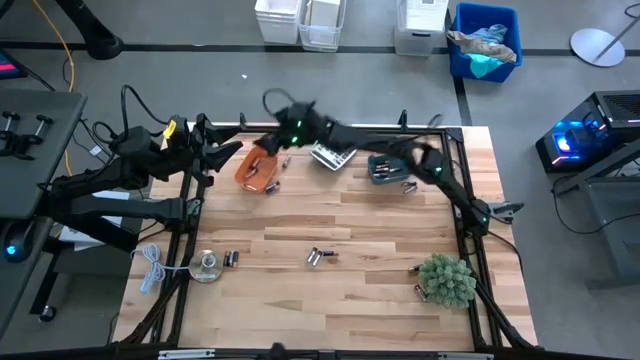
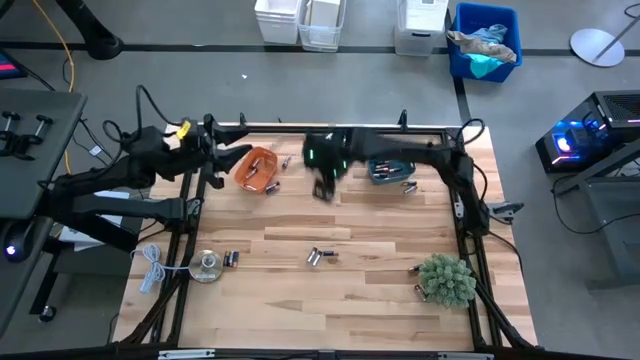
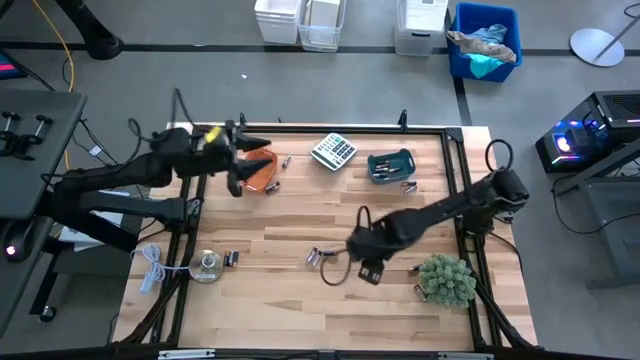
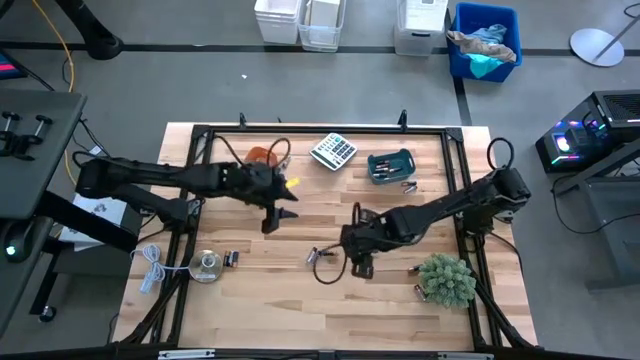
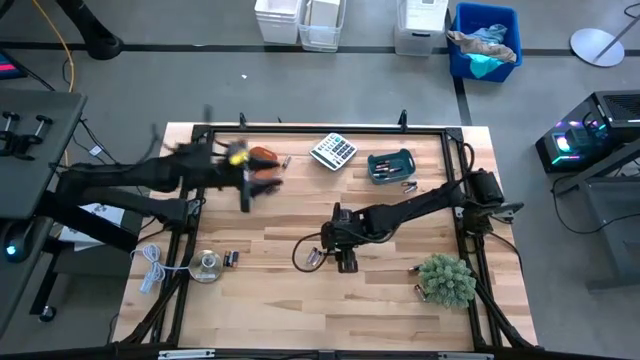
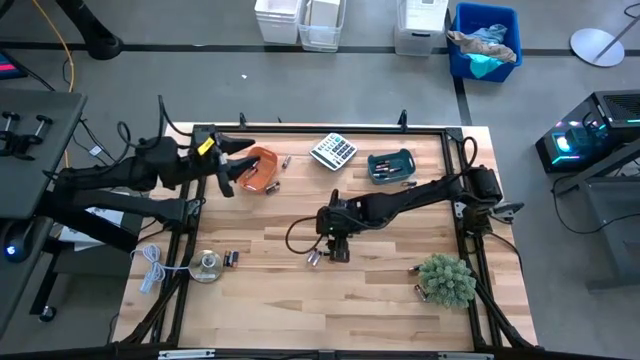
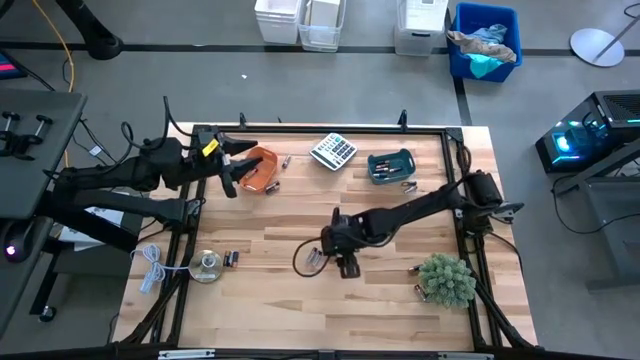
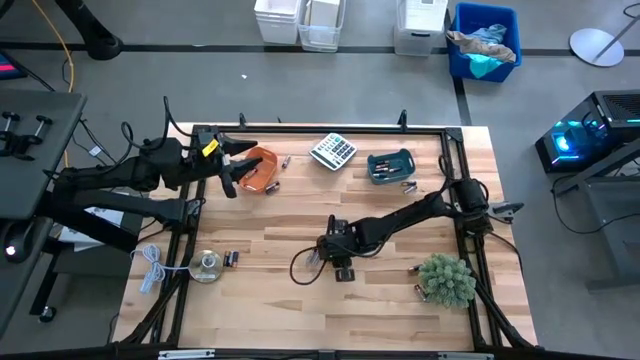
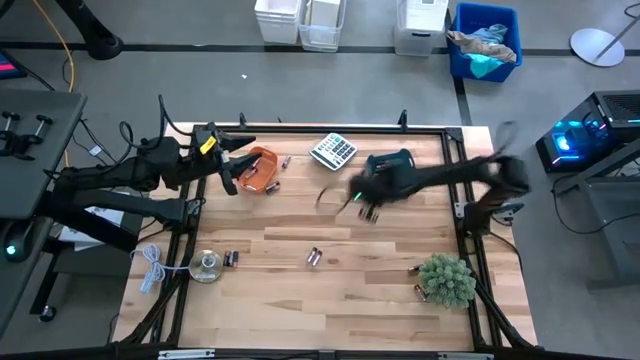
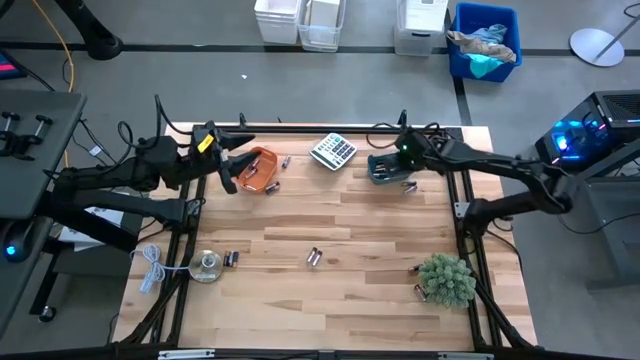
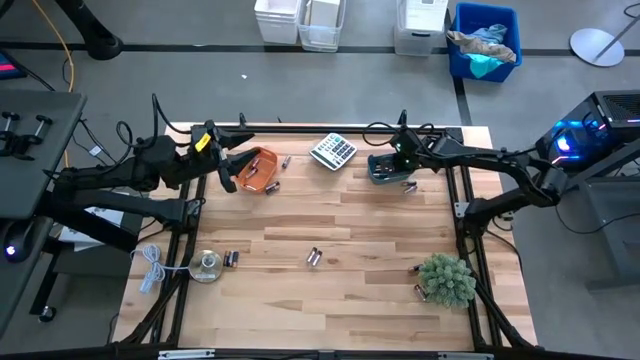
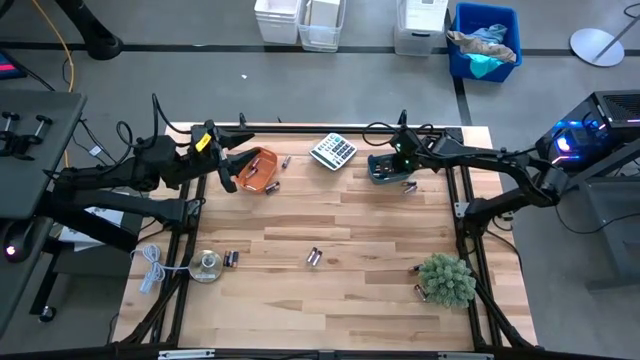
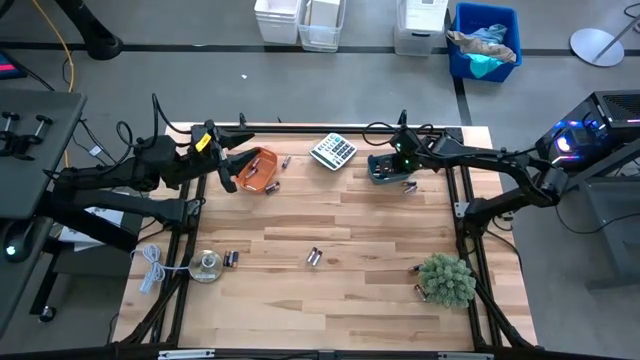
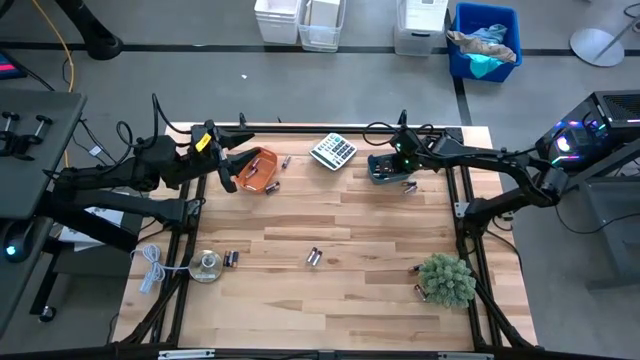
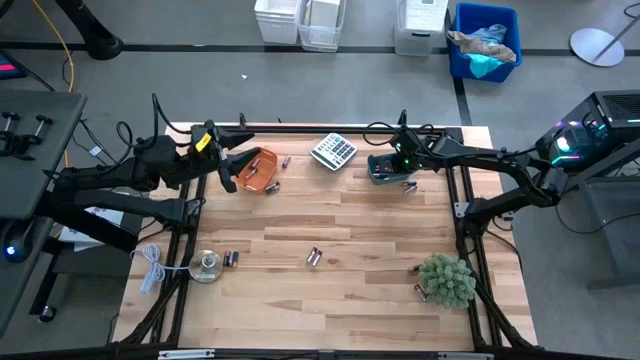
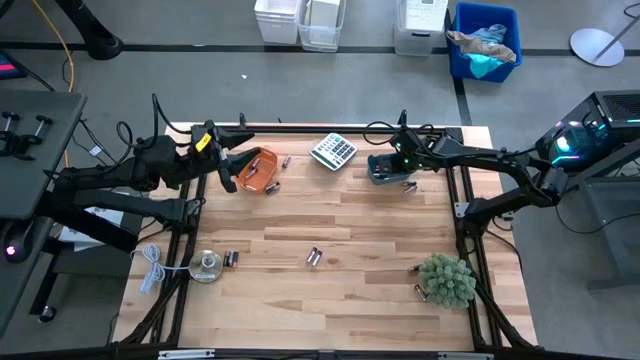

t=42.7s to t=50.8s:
Task: Sort batteries
Put the golden battery into the blue bin

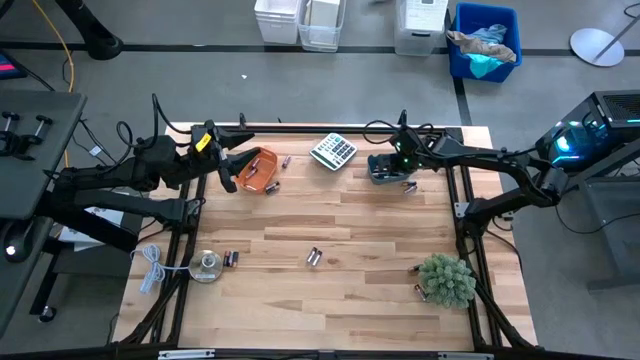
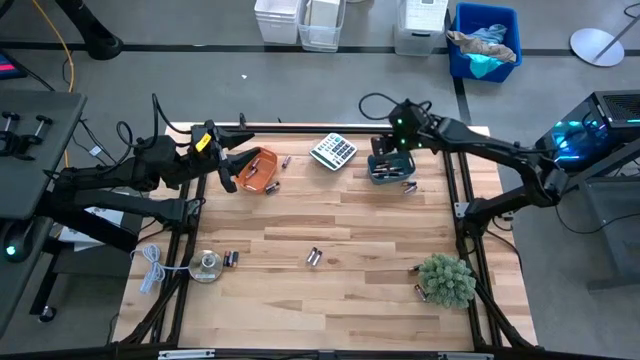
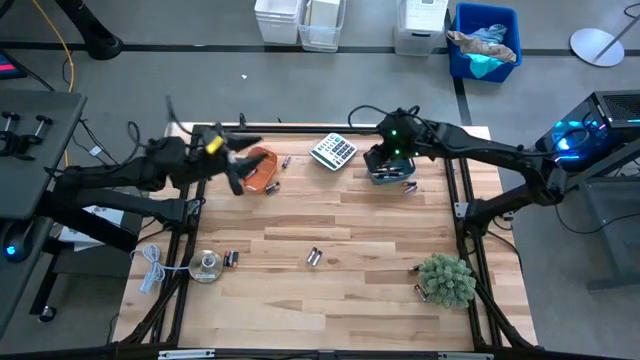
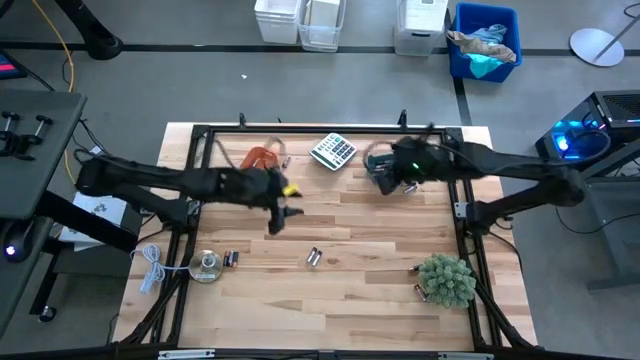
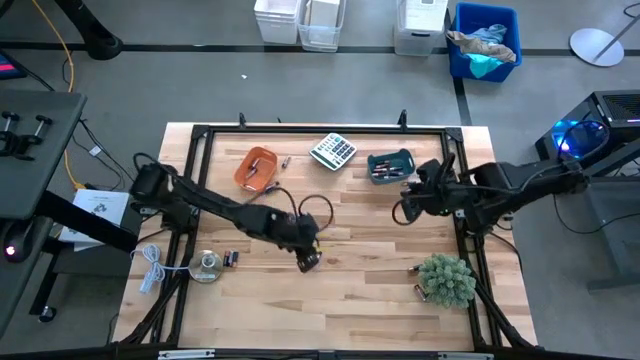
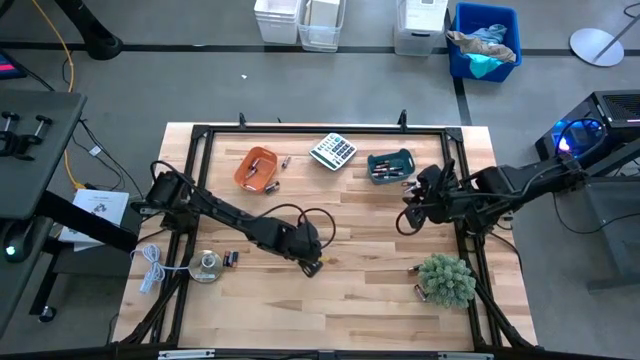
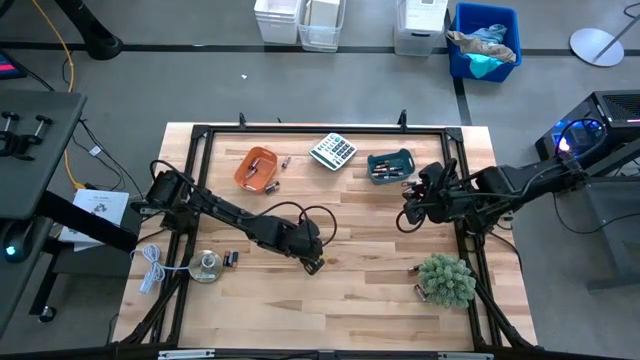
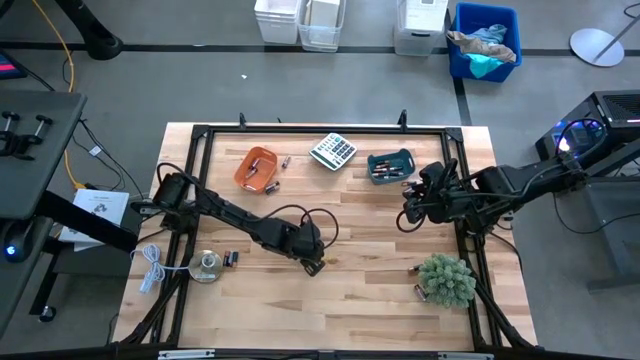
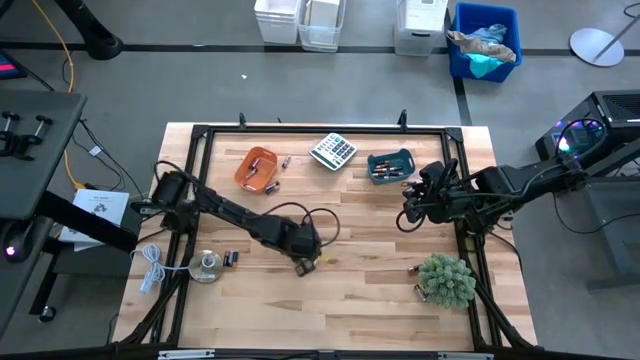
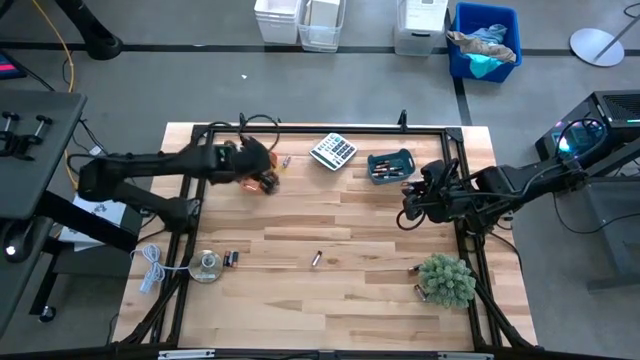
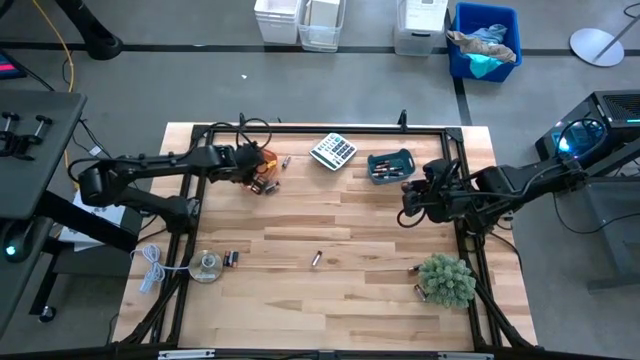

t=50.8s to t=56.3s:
Put the silver battery into the orange bin

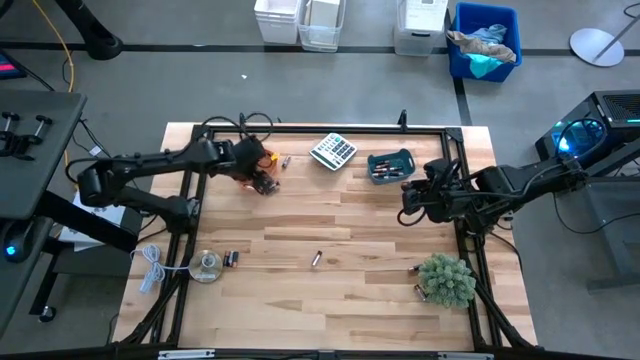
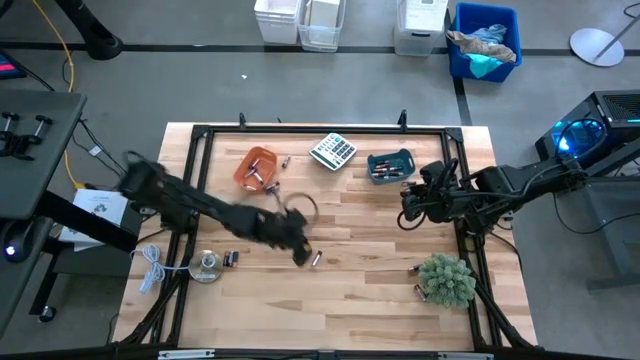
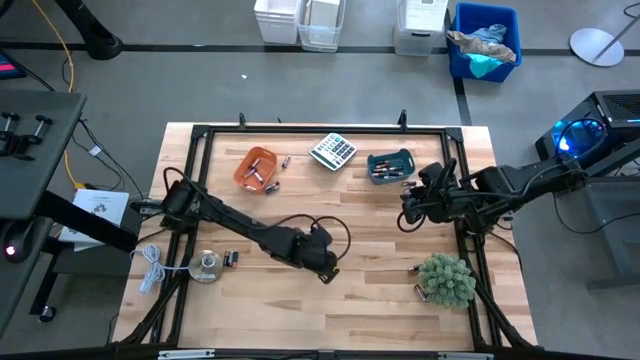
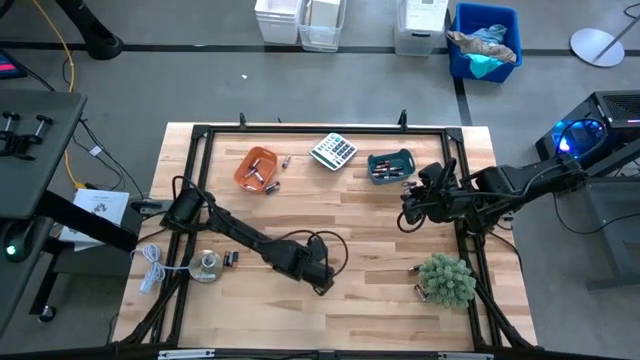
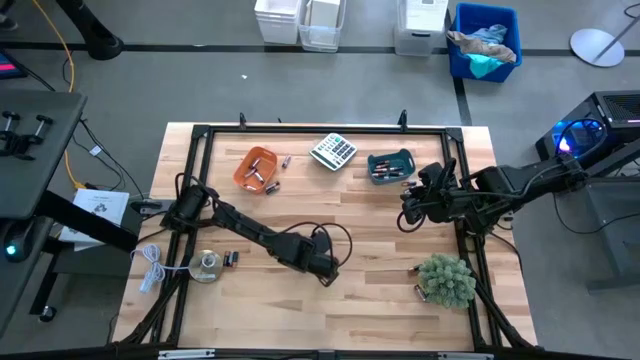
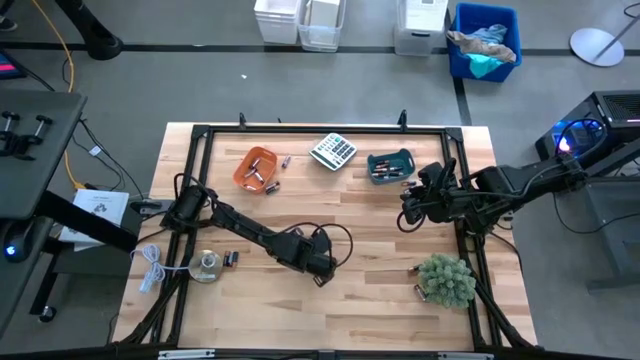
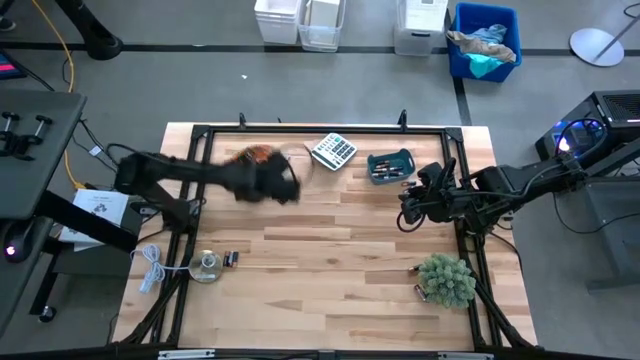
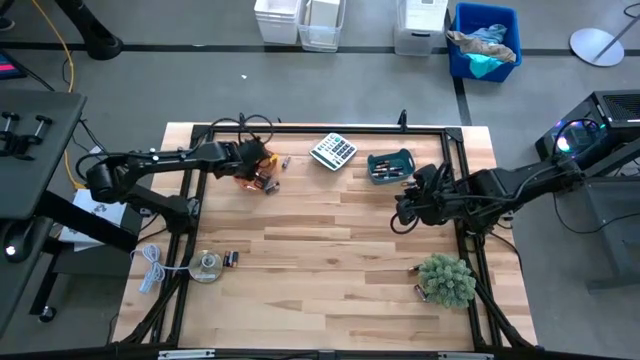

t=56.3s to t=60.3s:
Put the silver battery into the orange bin

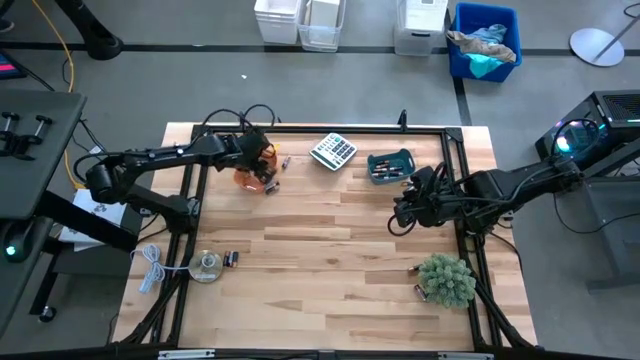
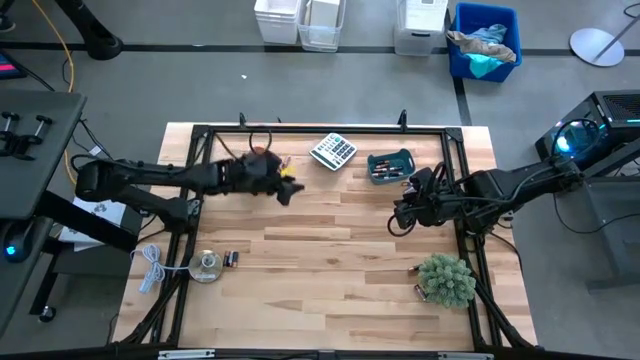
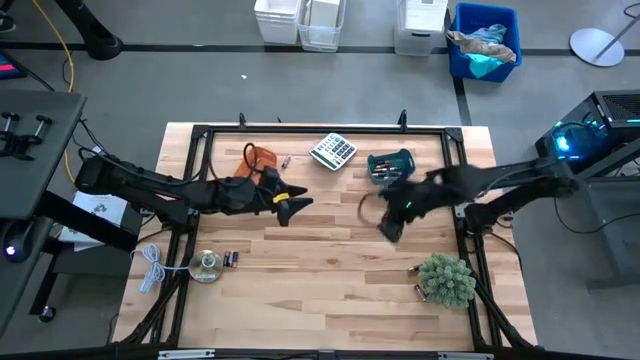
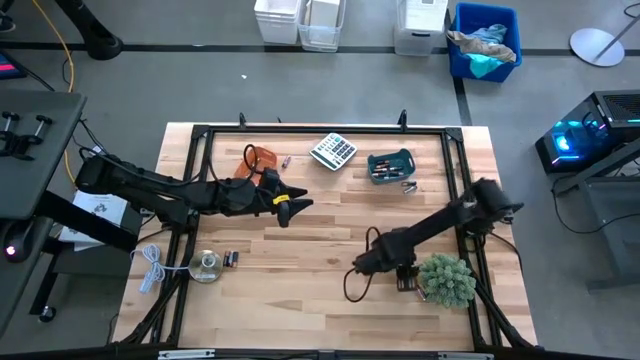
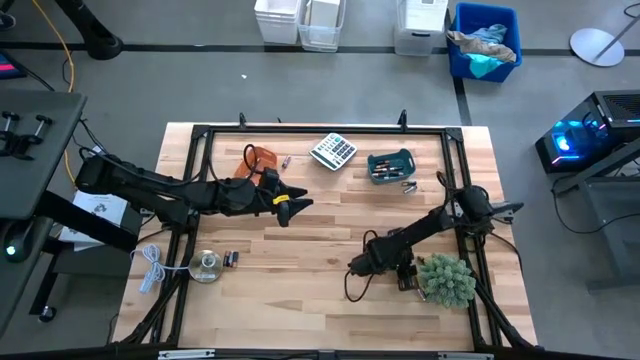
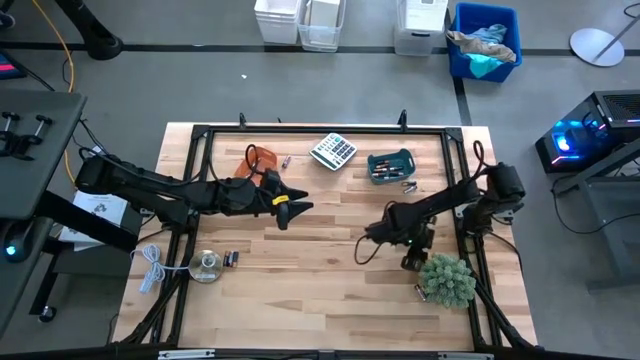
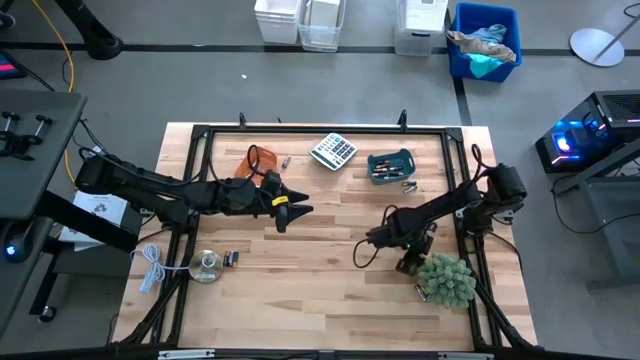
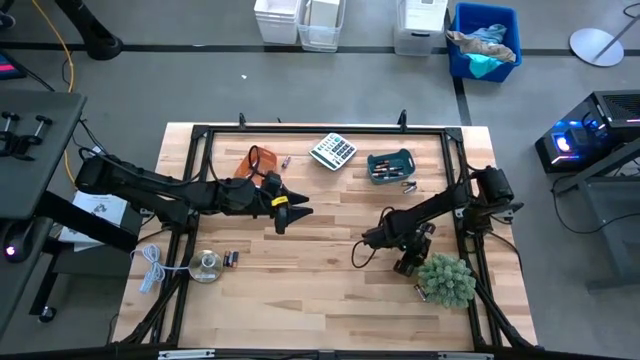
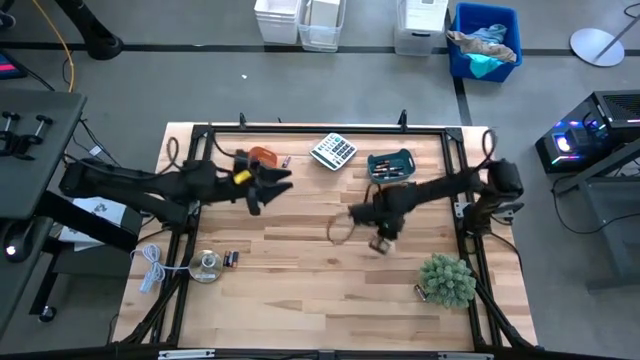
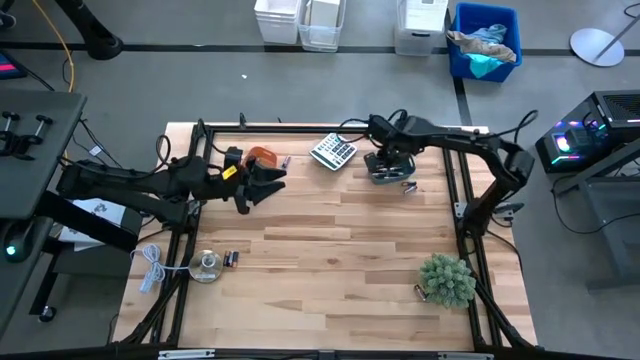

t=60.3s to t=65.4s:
Put the golden battery into the blue bin
